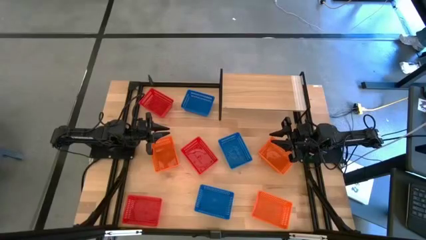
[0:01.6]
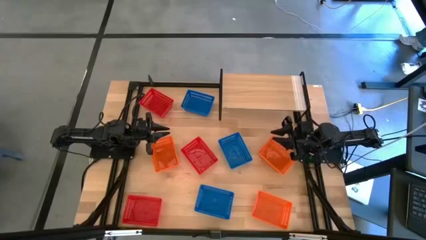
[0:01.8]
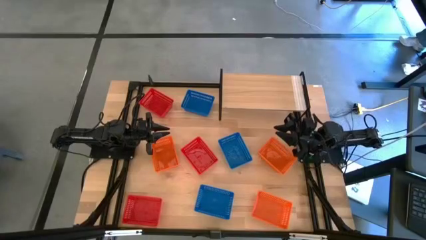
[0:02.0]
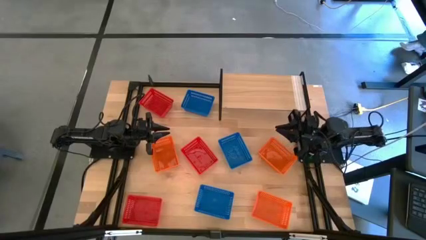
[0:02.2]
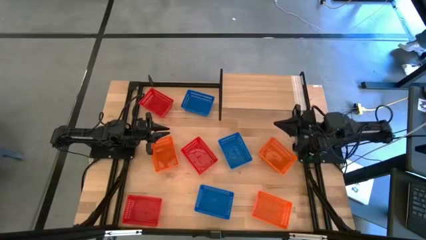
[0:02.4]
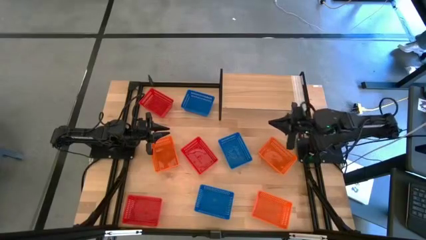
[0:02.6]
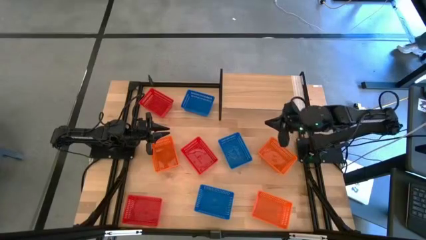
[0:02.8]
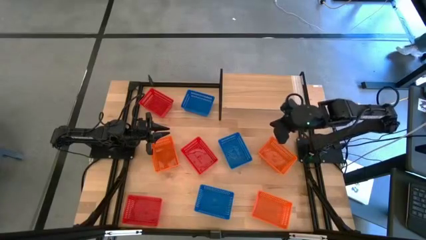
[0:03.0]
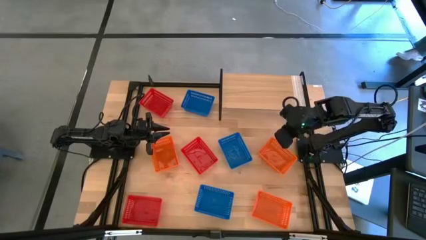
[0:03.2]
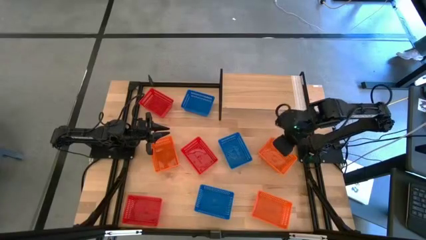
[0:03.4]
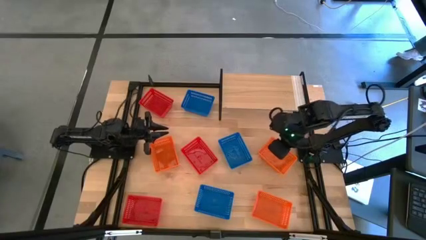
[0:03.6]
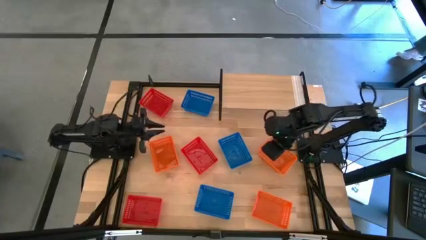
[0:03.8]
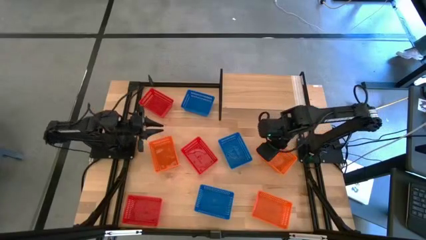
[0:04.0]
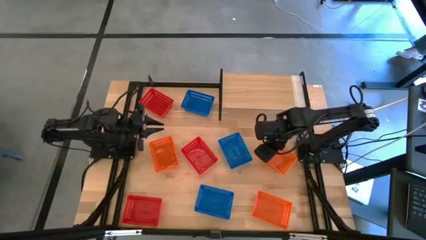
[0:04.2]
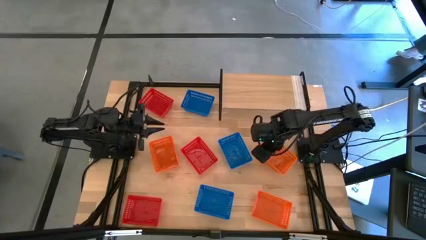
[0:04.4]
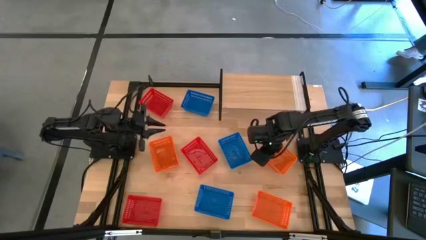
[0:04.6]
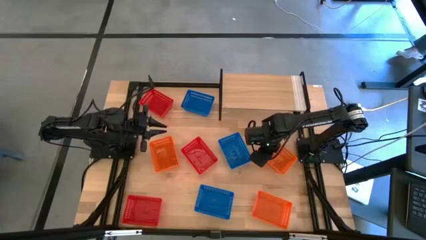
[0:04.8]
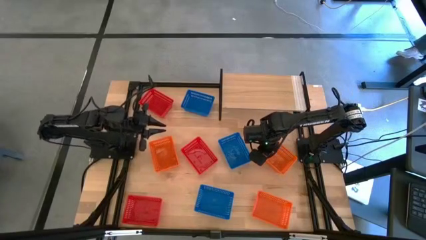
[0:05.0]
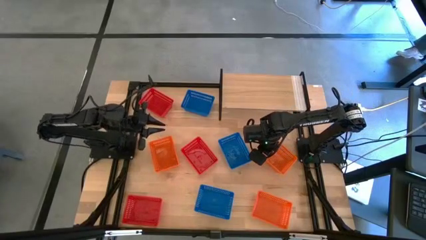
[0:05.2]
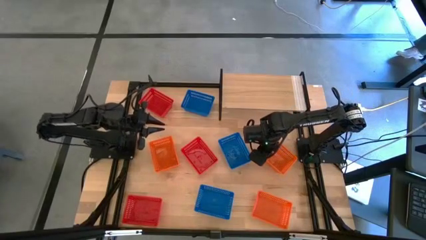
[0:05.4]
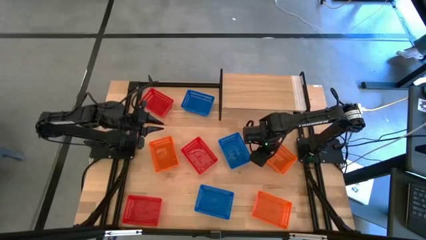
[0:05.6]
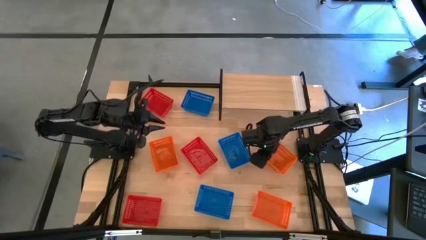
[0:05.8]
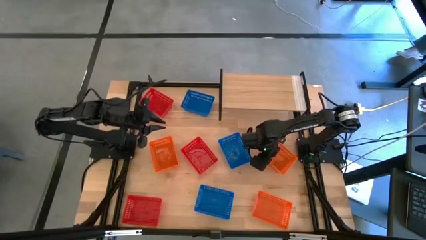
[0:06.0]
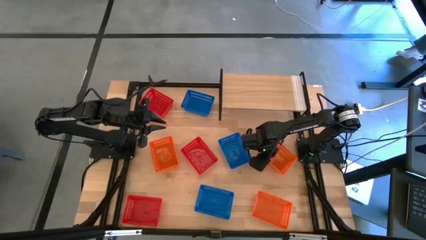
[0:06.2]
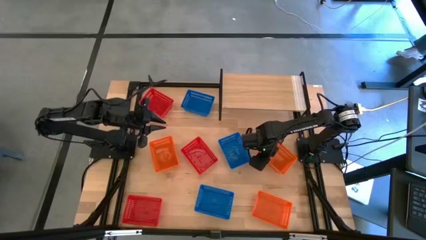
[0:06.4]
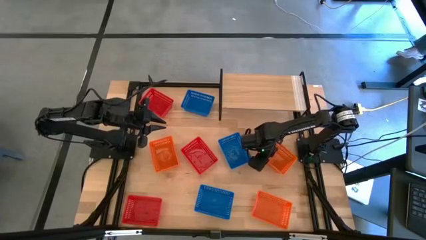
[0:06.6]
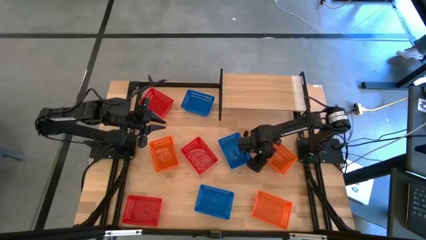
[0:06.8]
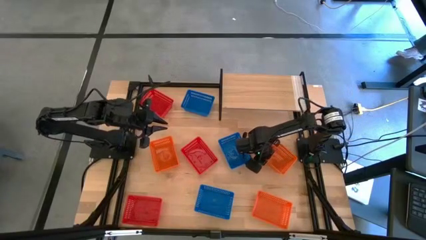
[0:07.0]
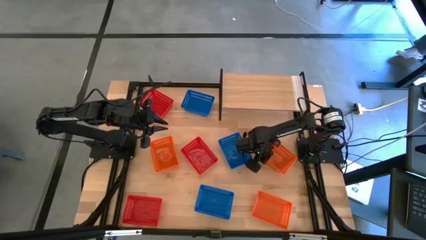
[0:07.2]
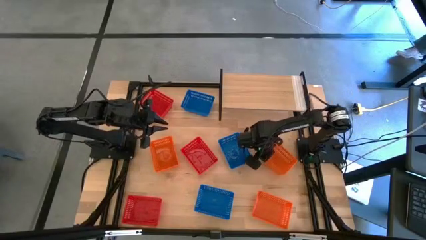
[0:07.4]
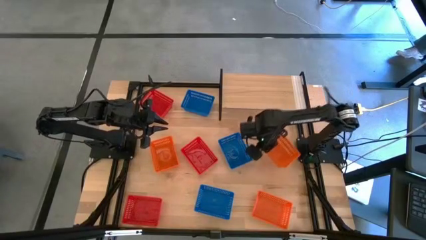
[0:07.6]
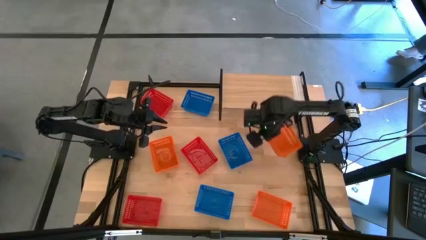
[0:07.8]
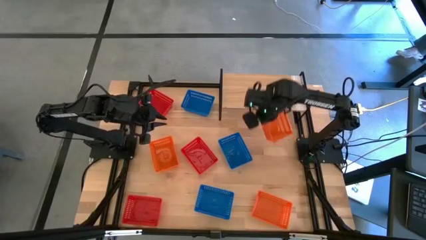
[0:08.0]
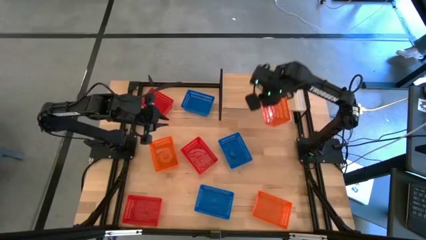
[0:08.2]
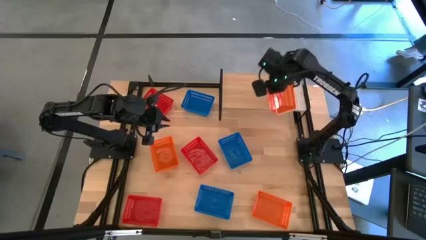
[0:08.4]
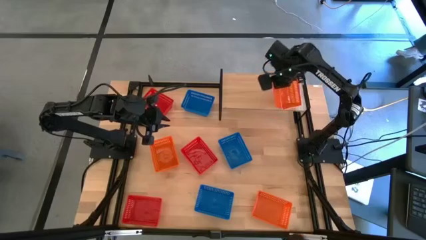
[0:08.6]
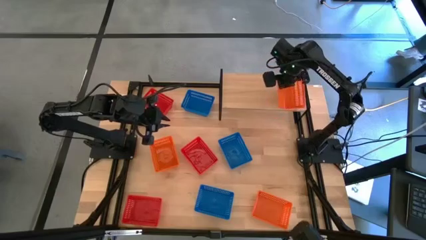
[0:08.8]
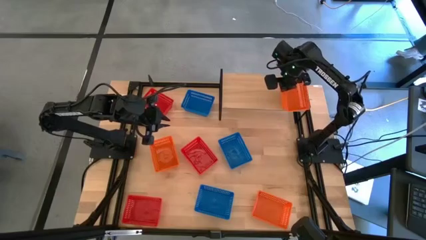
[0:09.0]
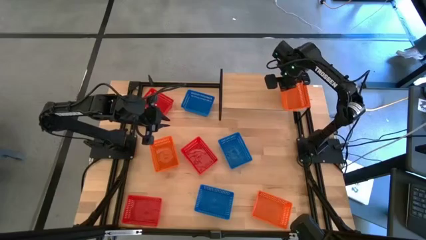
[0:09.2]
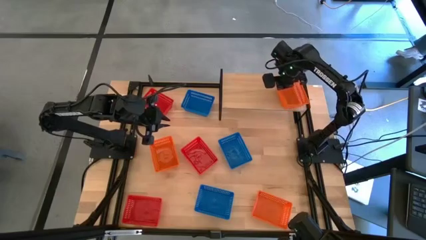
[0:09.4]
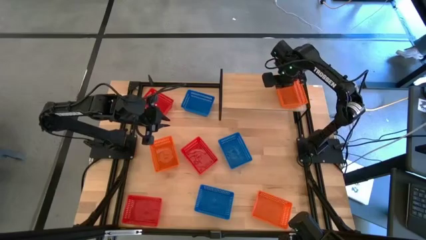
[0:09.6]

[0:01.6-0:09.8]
Task: Stack baskets on shelf by color
Put the top right orange bin on the shelf

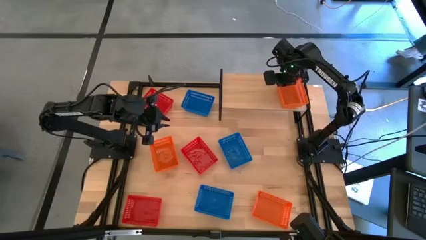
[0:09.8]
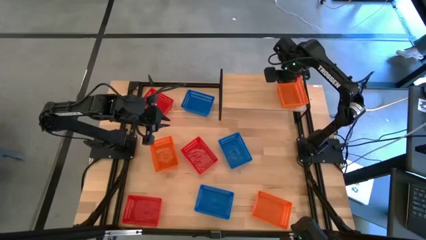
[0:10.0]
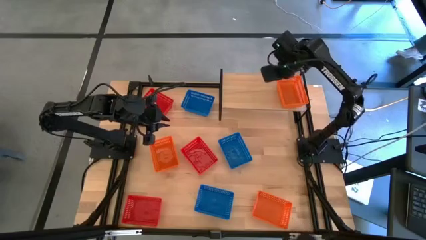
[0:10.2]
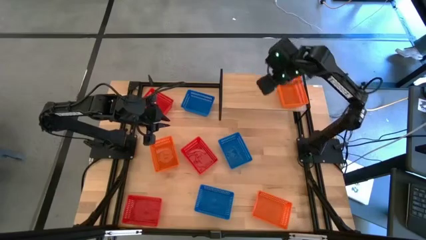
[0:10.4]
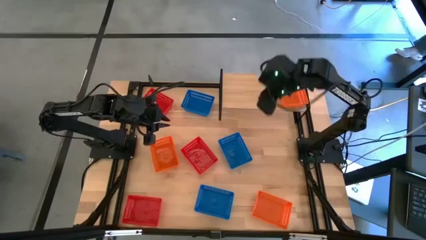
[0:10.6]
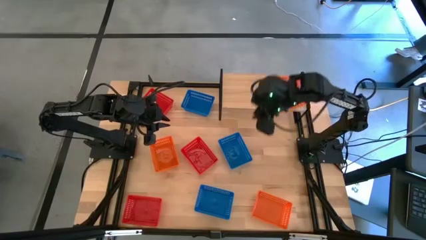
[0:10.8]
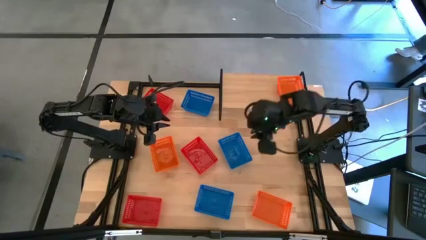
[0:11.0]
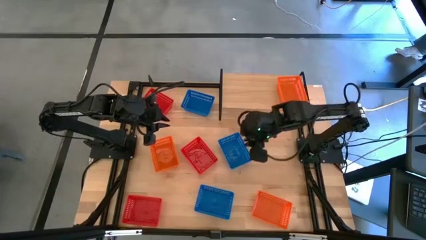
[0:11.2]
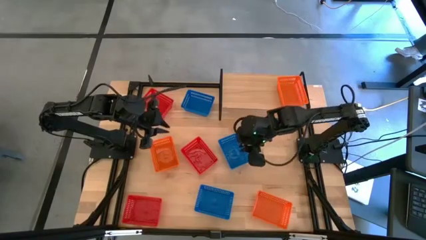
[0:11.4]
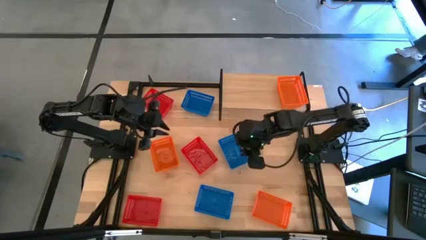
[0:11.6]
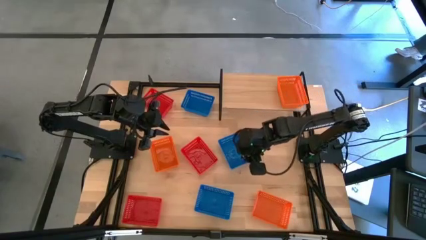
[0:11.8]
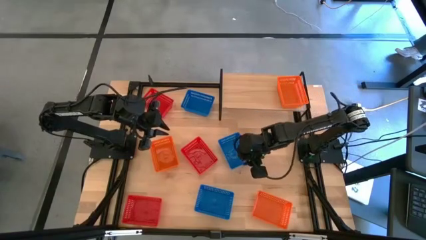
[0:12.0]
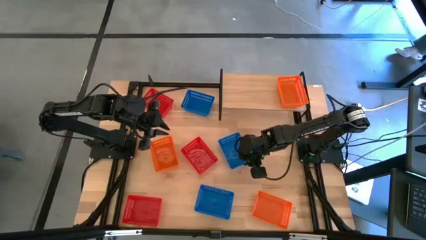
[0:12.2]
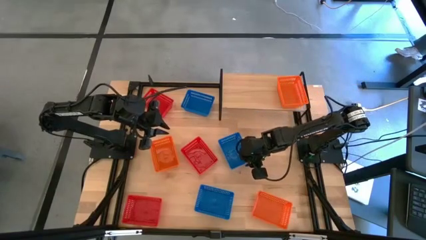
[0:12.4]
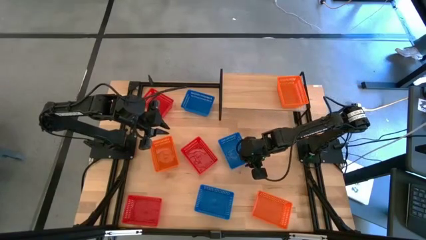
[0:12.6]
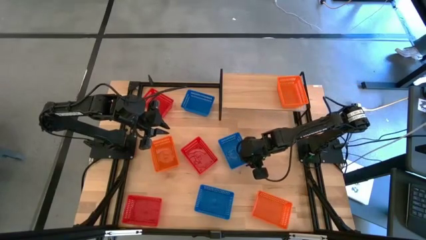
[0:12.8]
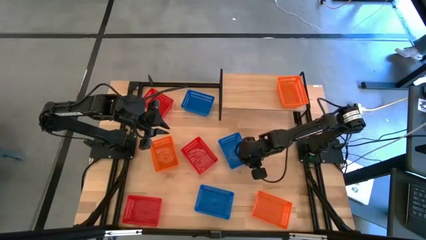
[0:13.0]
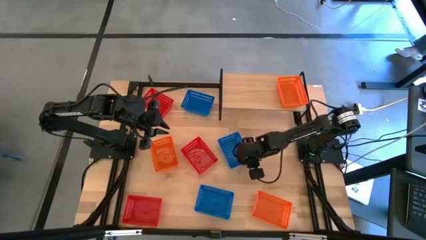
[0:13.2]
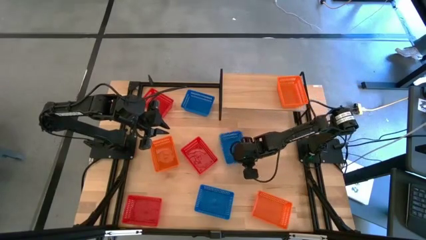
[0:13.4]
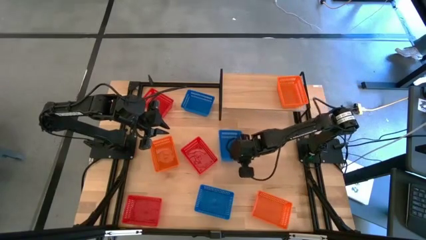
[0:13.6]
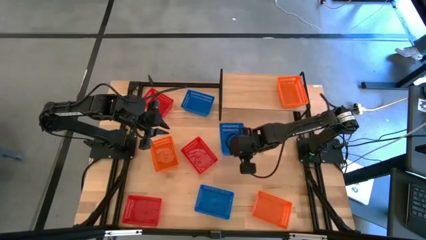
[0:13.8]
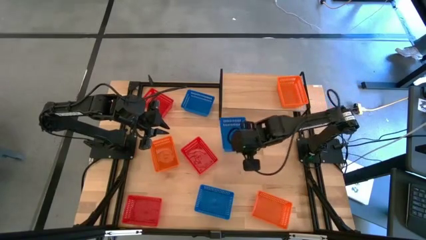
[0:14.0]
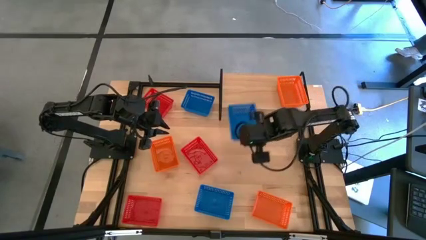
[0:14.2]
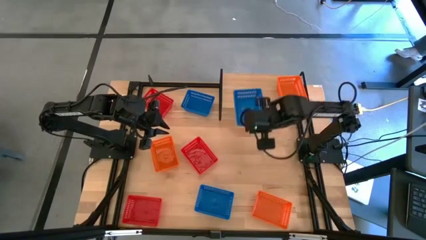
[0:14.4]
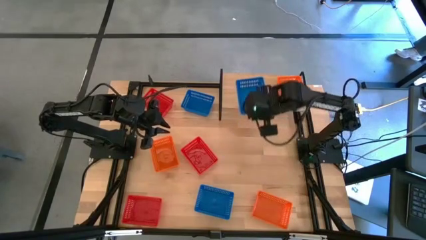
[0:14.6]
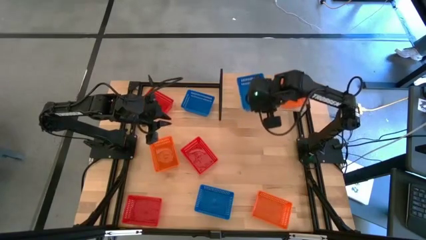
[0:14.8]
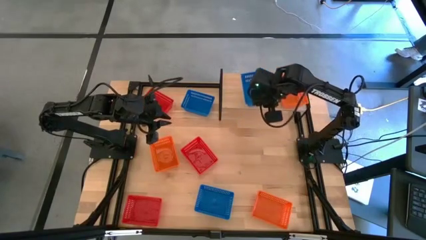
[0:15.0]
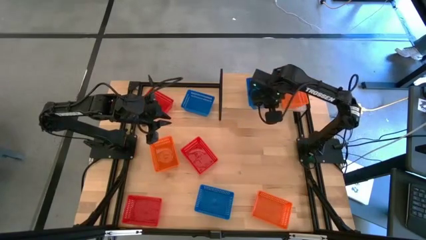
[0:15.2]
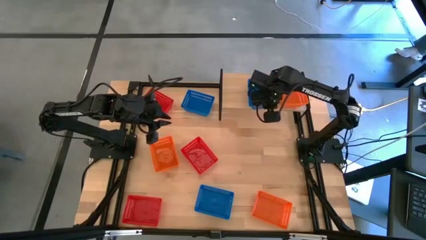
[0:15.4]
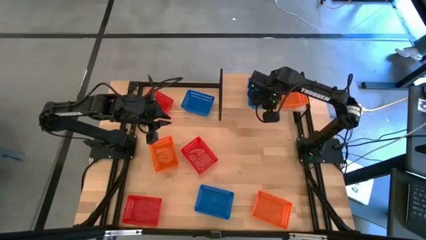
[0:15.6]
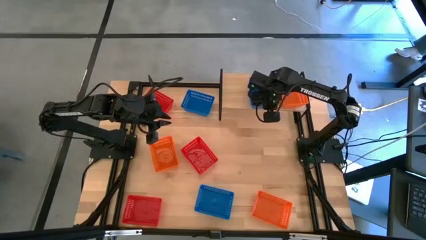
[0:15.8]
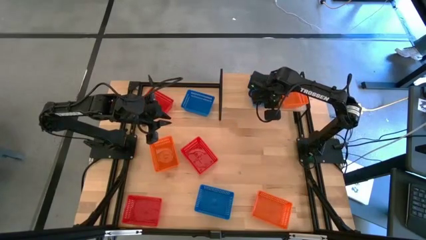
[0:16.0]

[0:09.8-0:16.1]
Put the middle blue bin on the shelf

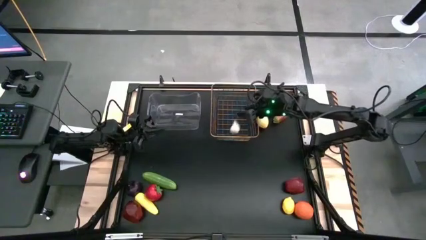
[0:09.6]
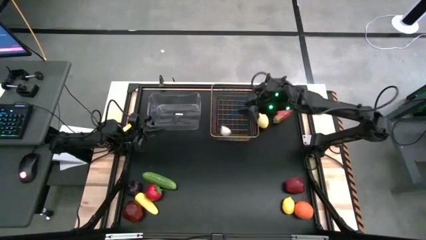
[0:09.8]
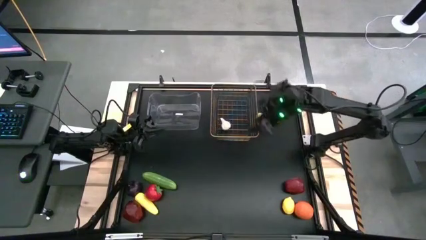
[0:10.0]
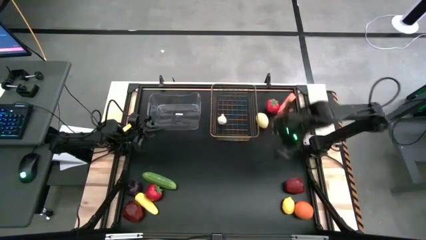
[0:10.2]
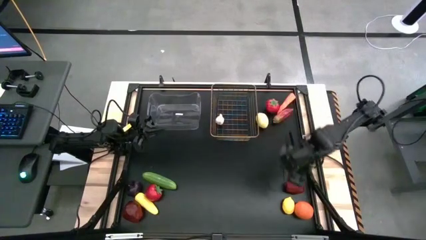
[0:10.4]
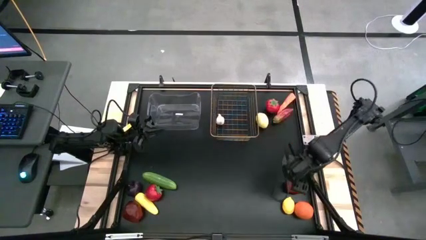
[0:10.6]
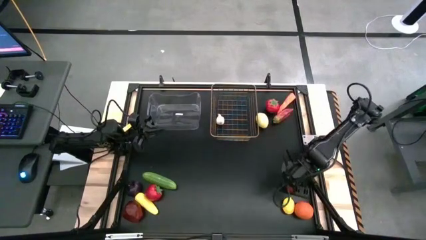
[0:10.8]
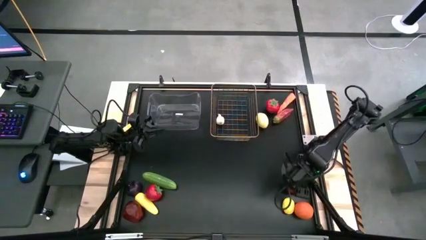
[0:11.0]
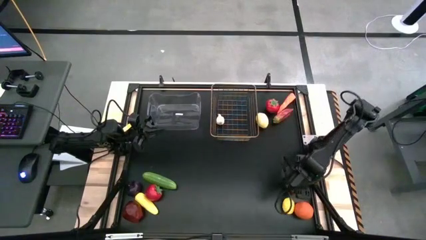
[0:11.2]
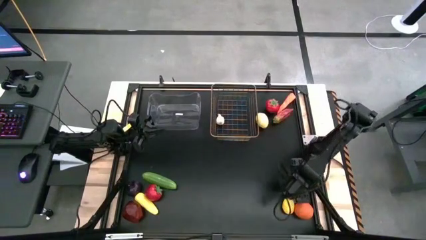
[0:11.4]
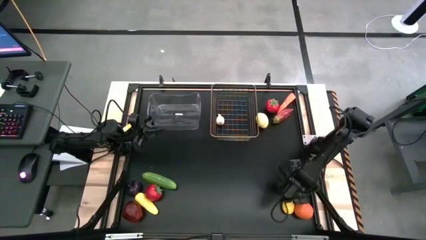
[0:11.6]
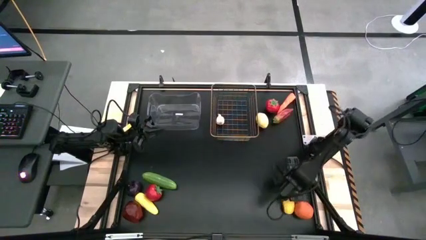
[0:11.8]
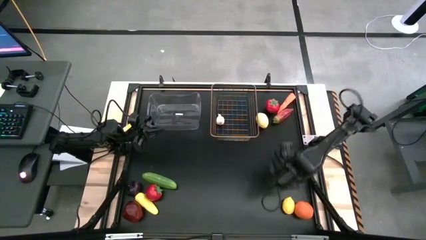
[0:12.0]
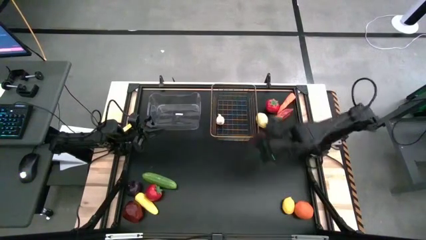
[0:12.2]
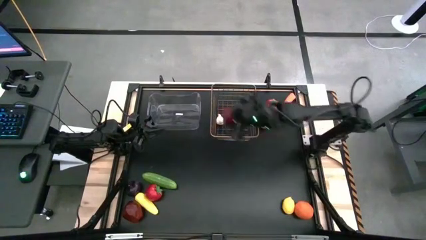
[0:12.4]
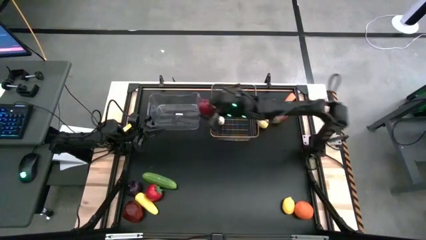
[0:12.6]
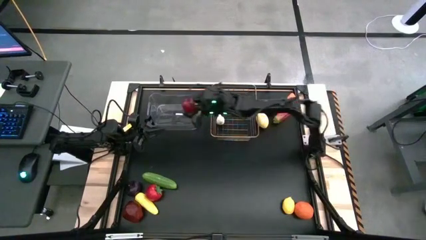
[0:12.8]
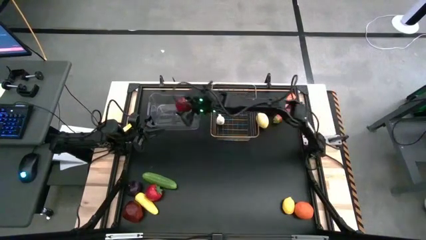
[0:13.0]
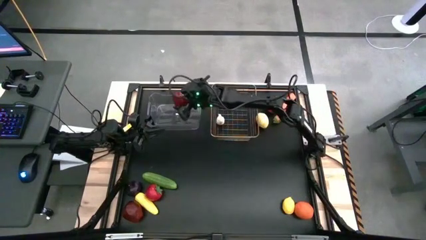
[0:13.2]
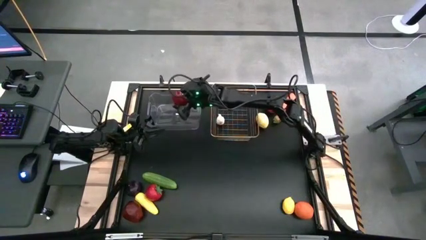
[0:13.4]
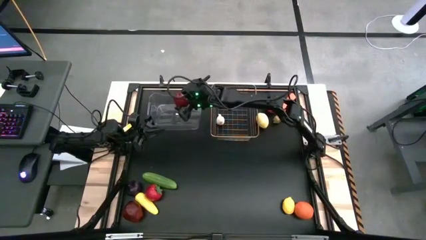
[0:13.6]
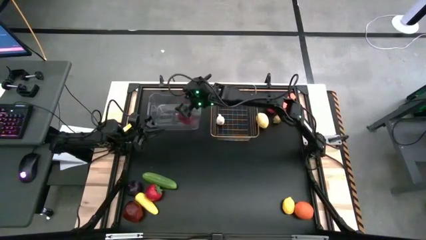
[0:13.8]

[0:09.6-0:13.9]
Task: Sort produce into baskets
Put the right apple into the transparent bin
